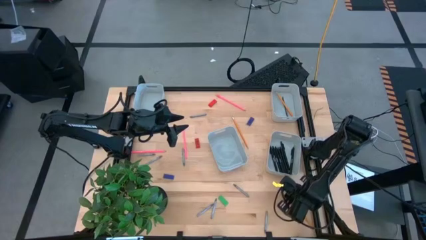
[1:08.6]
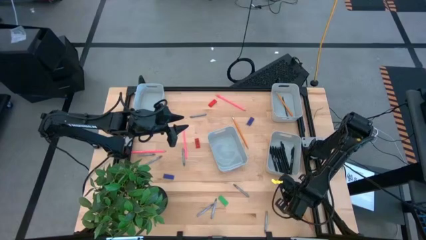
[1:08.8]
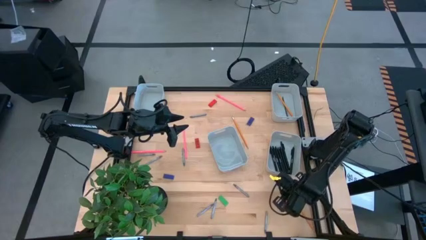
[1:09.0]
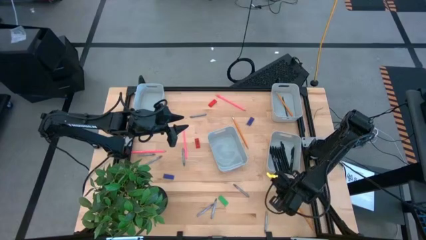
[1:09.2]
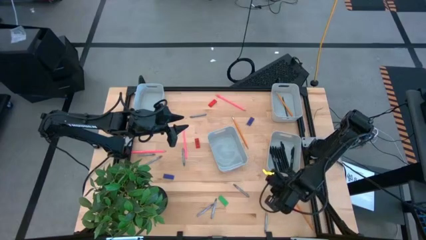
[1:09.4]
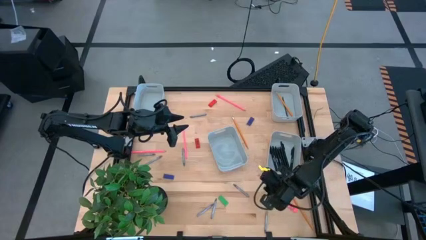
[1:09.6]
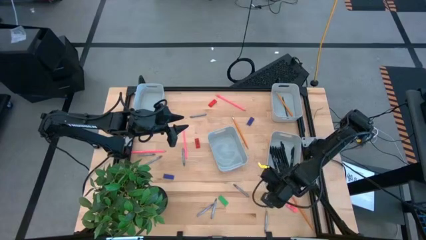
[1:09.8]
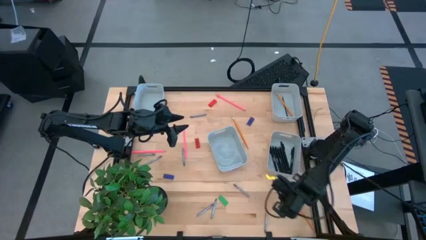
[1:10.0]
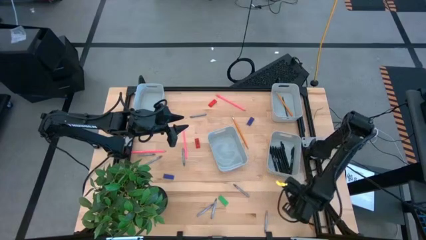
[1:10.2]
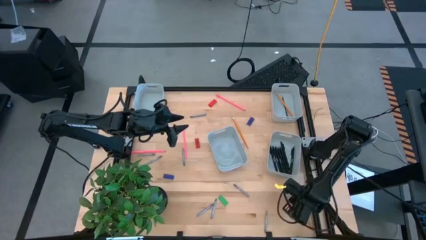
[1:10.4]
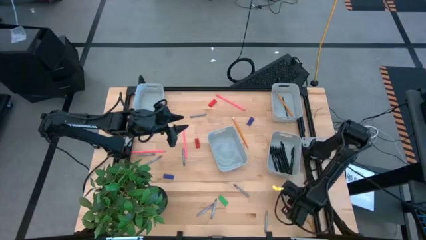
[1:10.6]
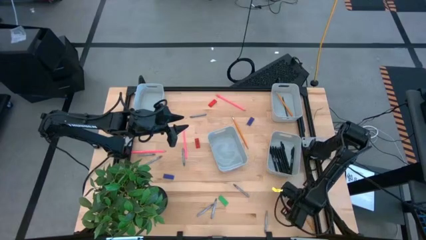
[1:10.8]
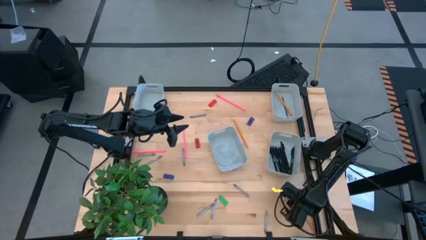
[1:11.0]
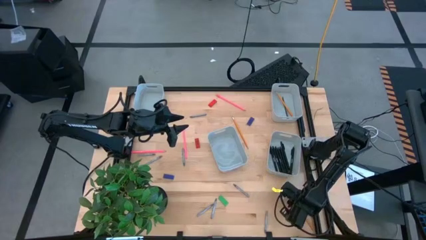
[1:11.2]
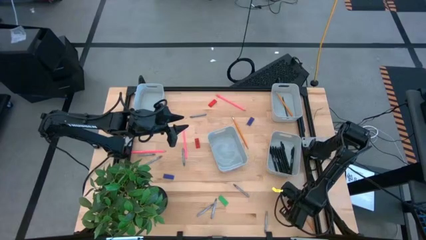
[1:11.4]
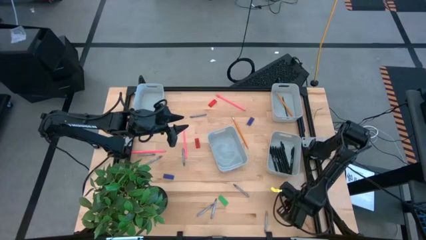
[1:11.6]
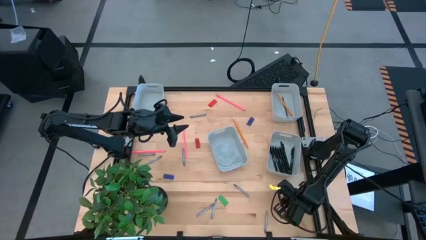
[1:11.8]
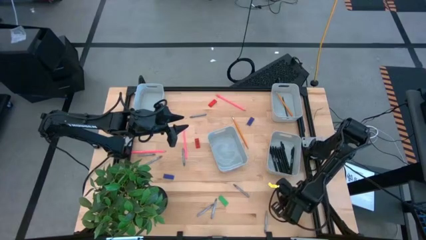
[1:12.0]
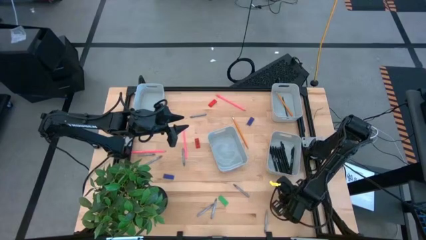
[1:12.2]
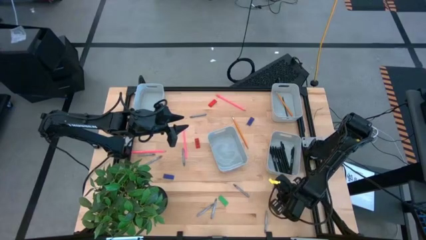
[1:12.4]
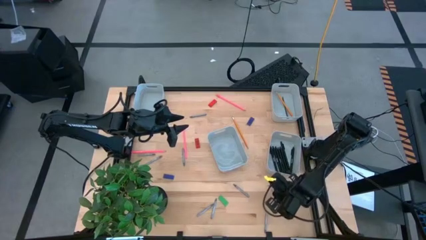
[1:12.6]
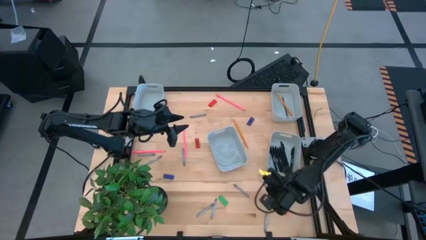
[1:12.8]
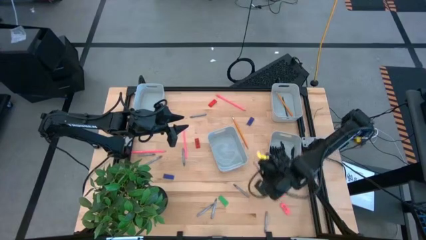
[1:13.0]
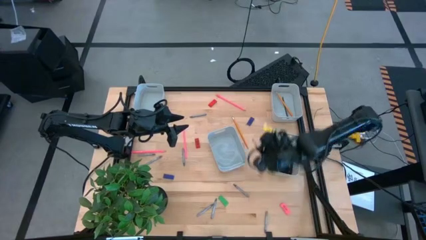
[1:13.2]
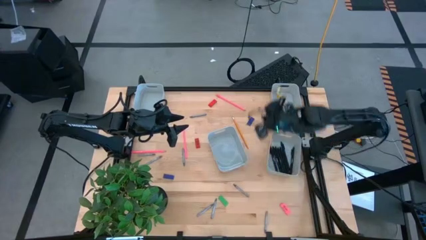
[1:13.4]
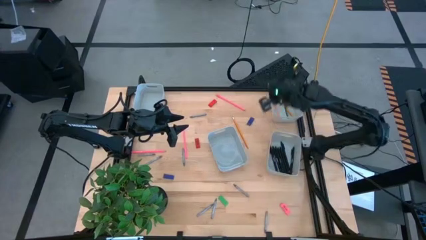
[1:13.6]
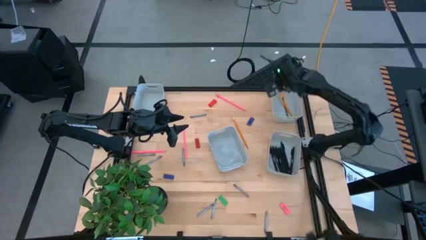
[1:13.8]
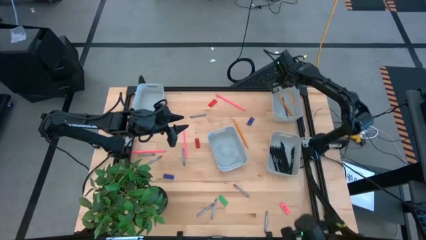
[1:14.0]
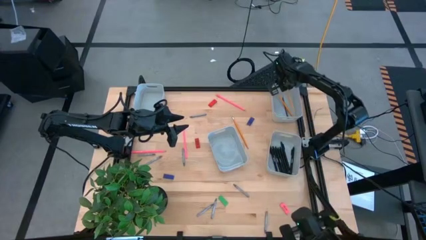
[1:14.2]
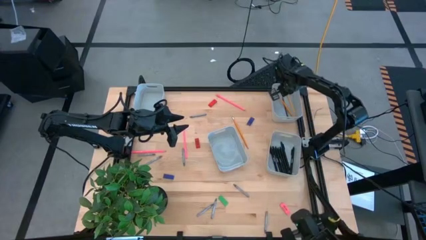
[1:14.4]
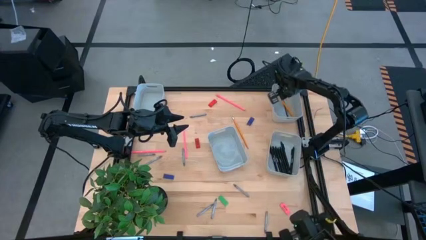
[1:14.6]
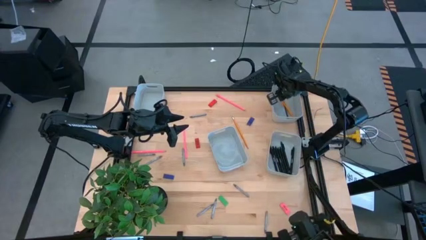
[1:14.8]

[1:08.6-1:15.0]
Task: Sort crayons/erasers/pens/pencils in bins
Put the yellow pencil into the top right gray bin

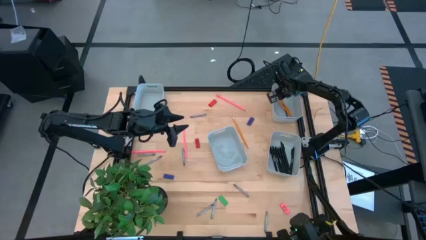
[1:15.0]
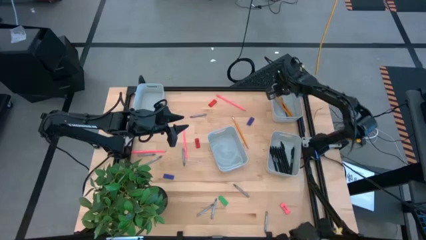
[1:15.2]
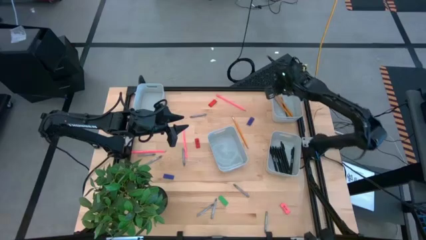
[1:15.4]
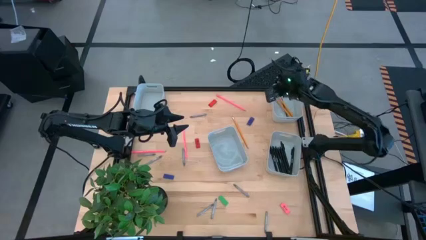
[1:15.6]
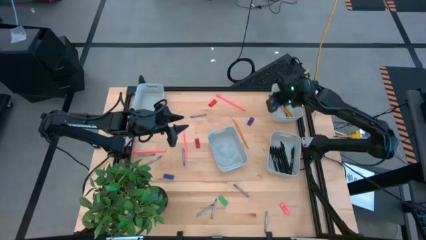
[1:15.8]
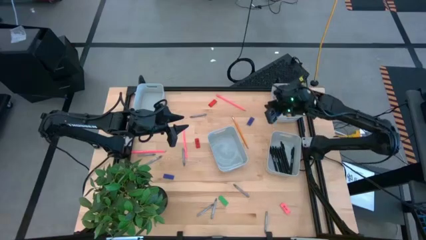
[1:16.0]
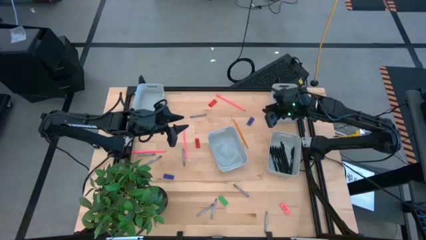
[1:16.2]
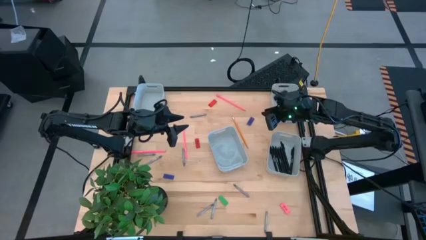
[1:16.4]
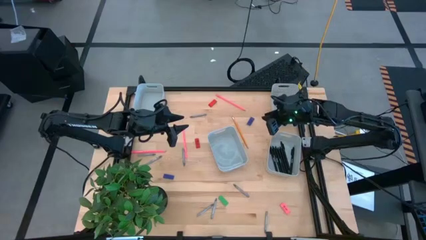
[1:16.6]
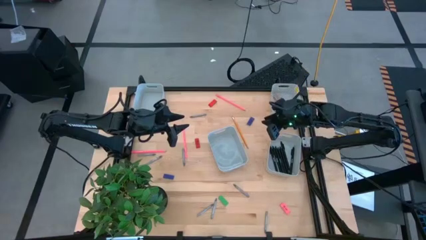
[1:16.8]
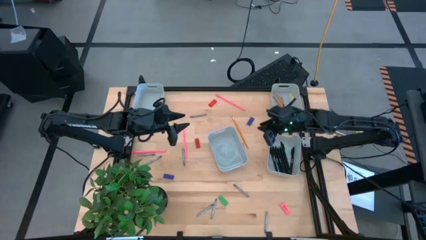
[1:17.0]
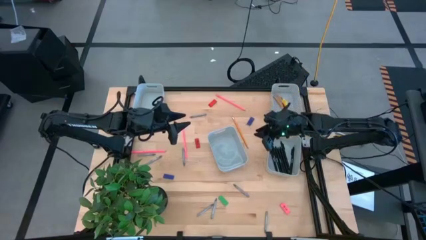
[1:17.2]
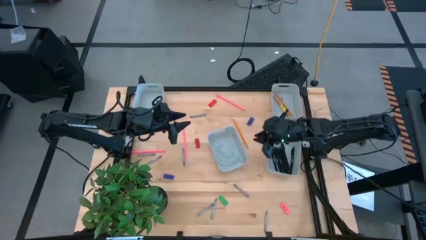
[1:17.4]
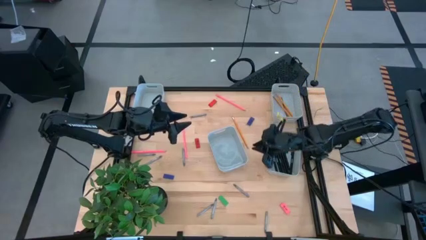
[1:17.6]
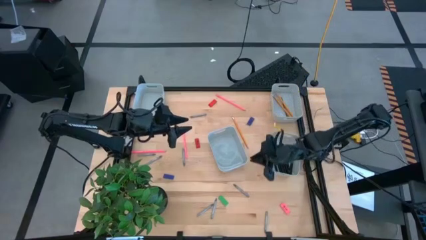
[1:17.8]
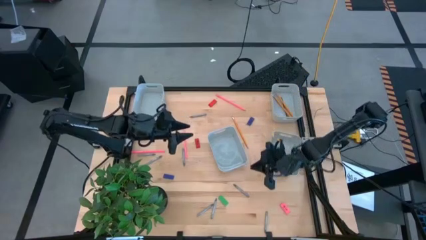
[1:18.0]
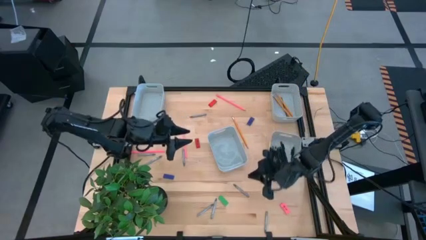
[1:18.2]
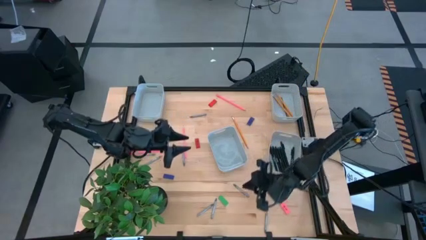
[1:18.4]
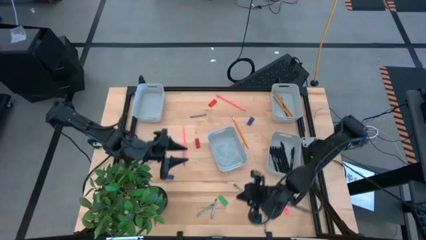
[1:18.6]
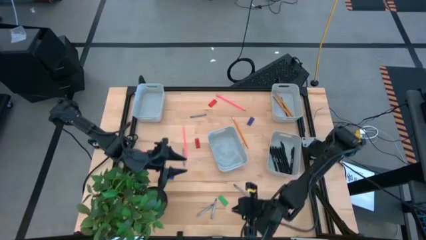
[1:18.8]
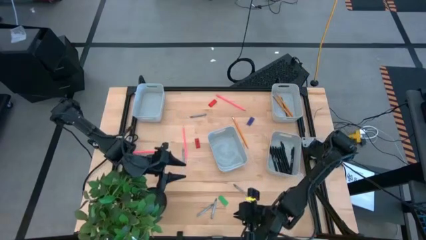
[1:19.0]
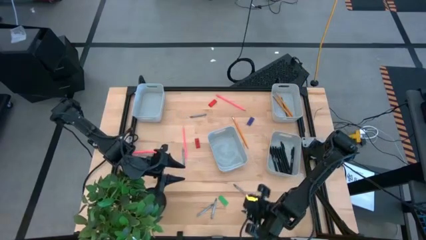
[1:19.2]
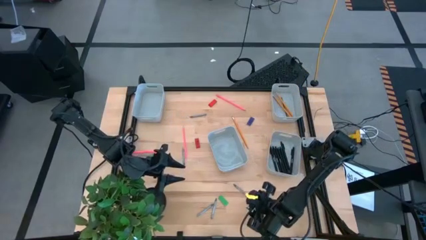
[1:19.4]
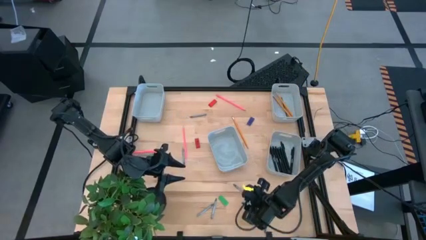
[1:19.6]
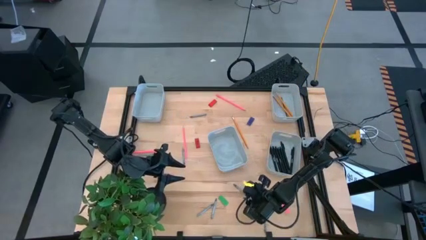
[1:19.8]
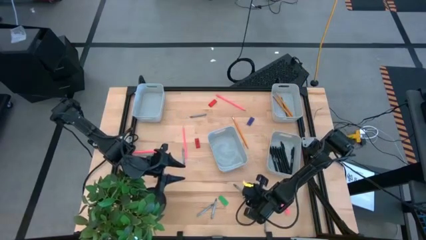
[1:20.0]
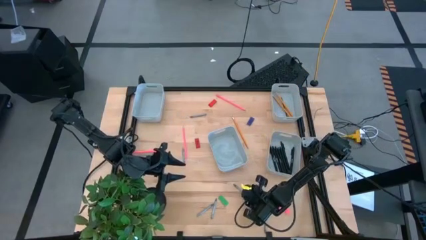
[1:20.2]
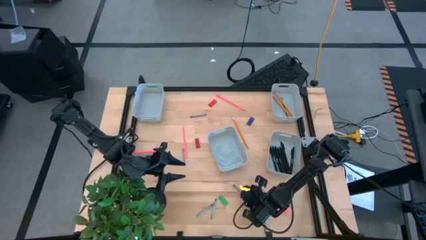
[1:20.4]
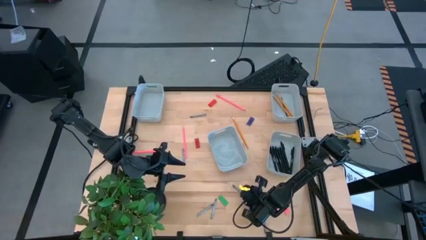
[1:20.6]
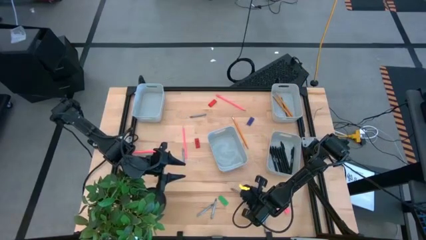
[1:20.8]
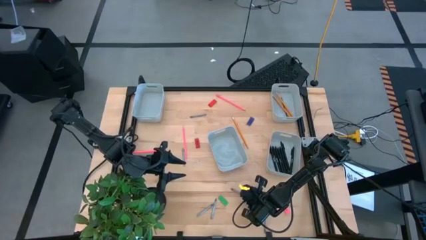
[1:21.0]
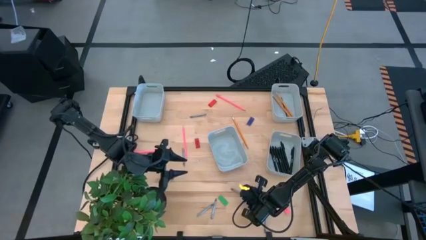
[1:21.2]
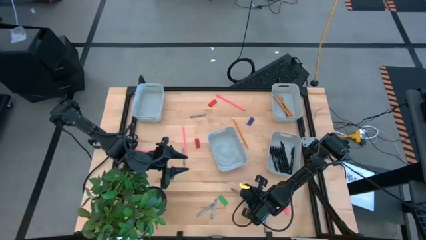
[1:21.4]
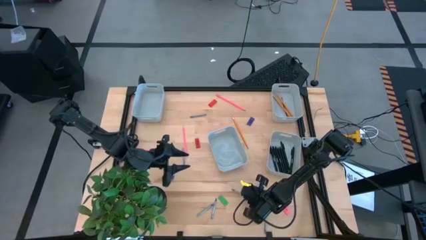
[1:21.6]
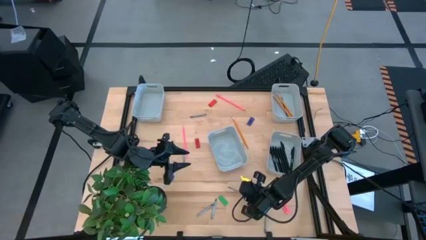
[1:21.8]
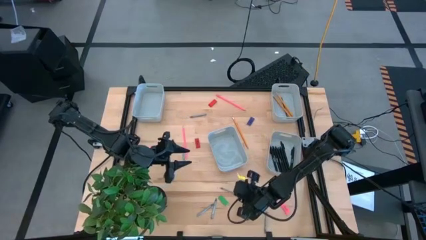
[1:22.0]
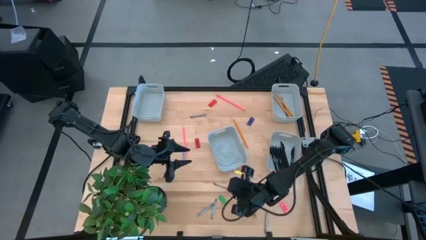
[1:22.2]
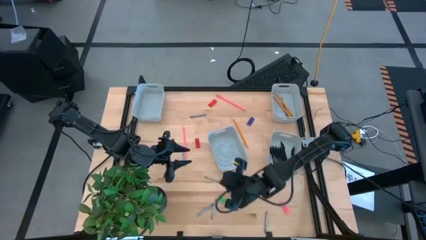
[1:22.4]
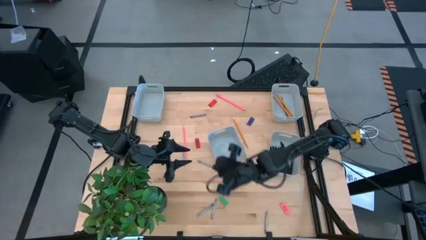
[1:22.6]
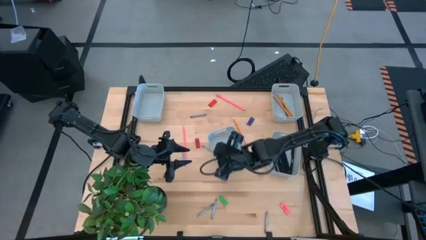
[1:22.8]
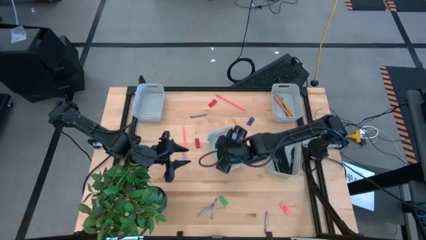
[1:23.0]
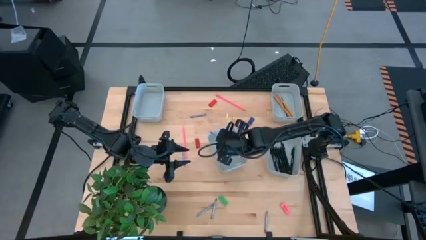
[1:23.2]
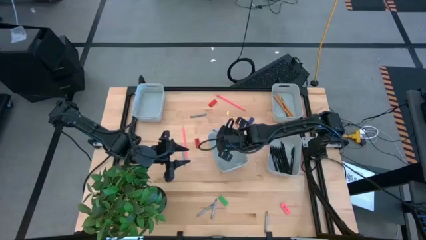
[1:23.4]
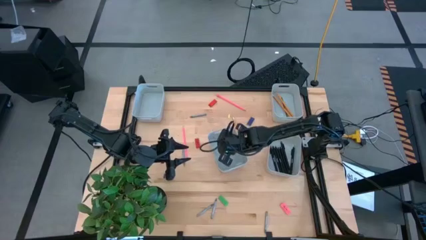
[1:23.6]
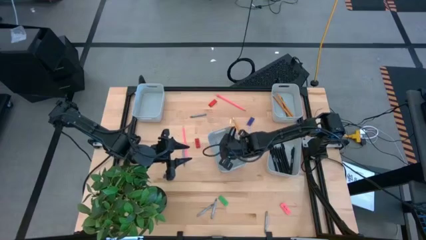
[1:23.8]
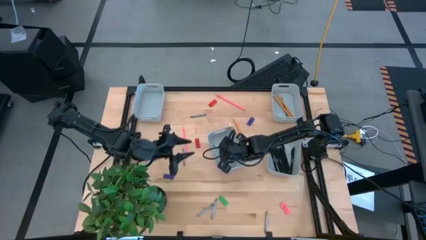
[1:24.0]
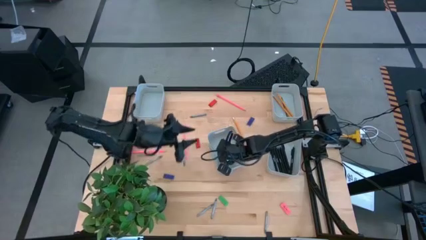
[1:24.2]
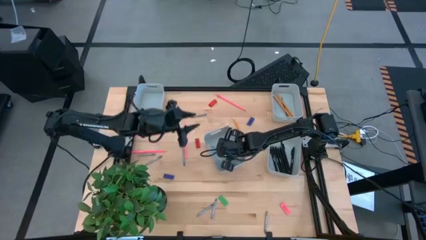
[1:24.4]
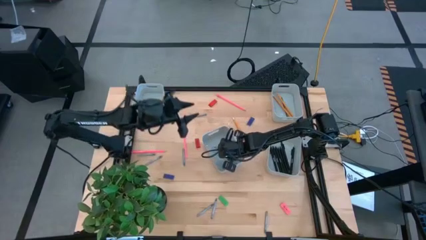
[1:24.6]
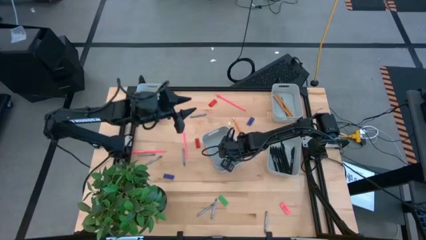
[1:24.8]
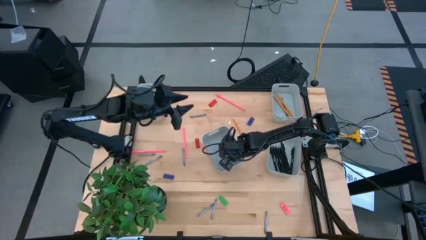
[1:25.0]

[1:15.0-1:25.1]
Put the gray crayon into the bottom left gray bin
